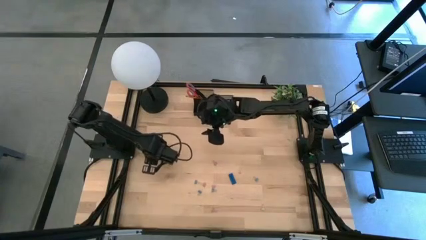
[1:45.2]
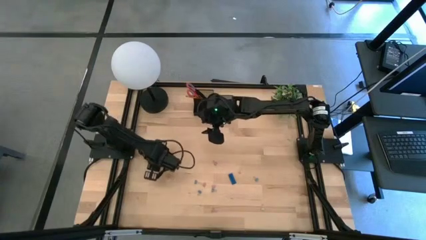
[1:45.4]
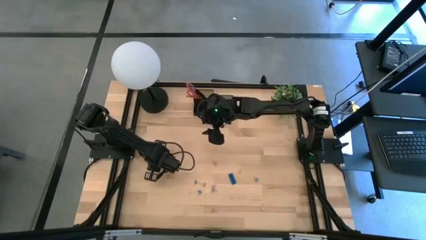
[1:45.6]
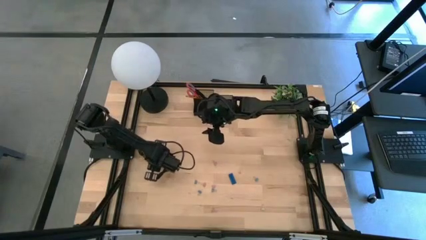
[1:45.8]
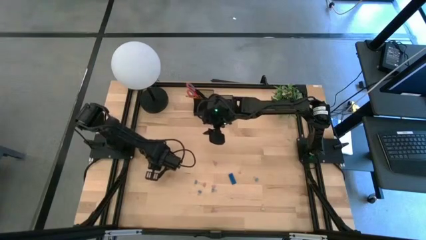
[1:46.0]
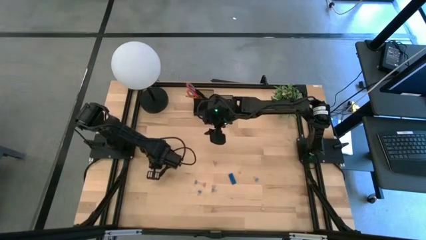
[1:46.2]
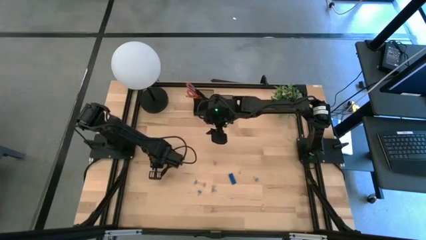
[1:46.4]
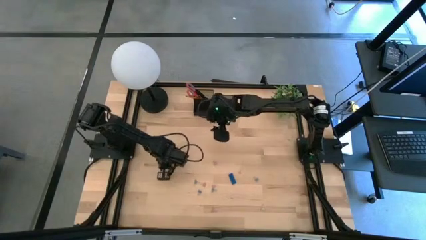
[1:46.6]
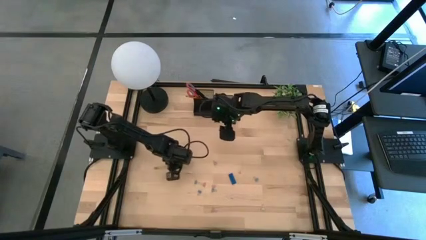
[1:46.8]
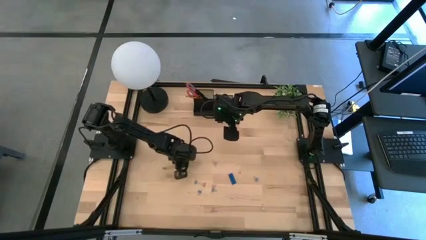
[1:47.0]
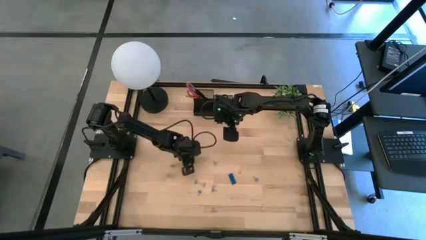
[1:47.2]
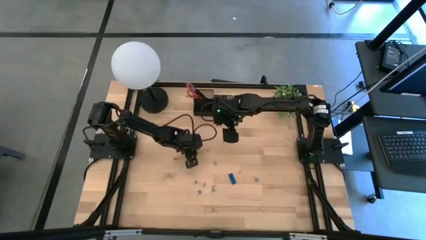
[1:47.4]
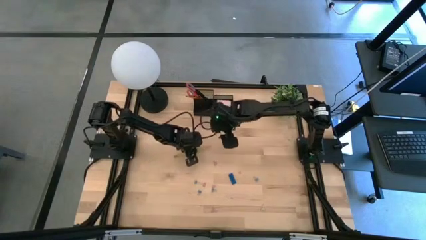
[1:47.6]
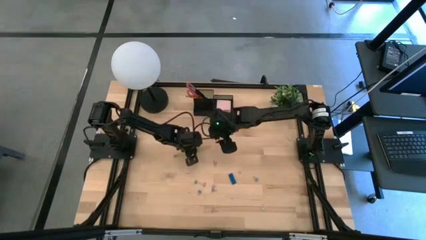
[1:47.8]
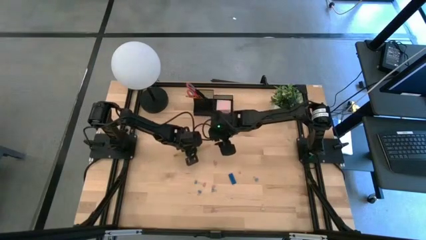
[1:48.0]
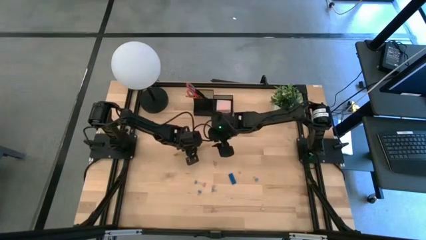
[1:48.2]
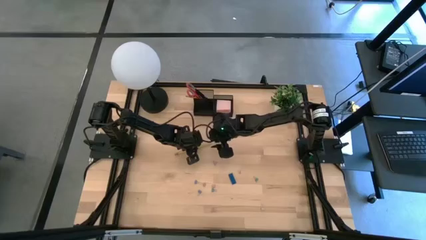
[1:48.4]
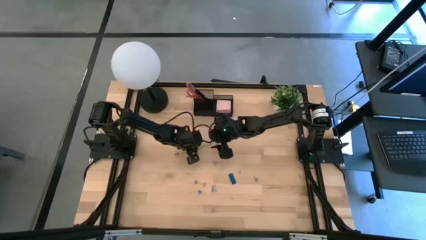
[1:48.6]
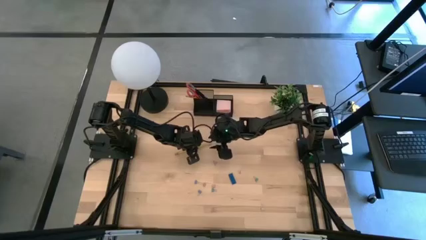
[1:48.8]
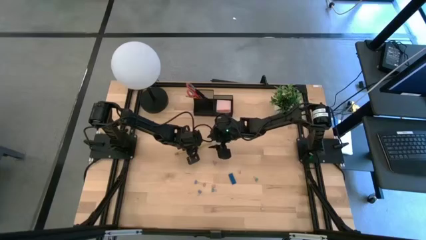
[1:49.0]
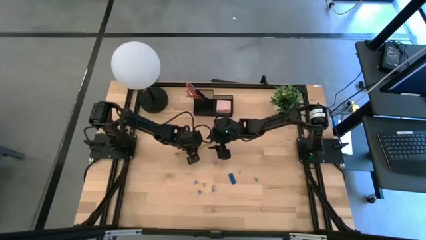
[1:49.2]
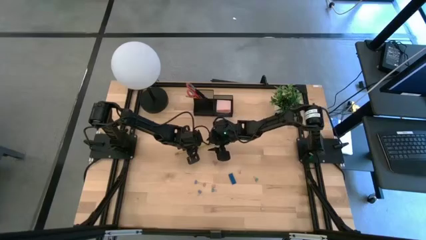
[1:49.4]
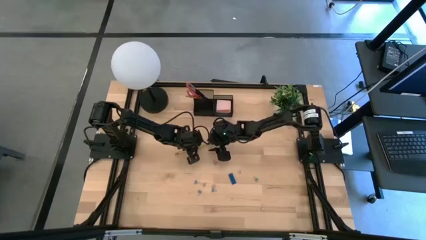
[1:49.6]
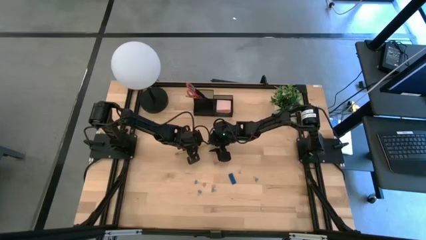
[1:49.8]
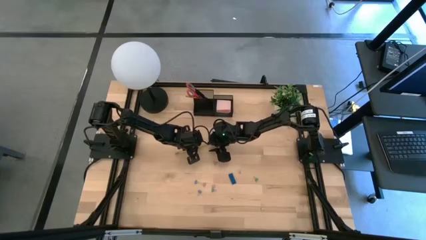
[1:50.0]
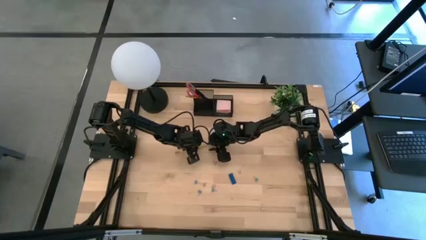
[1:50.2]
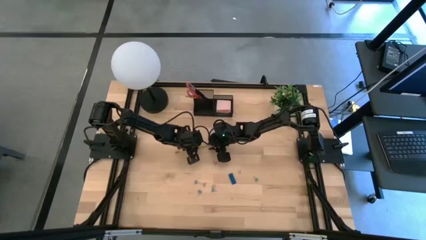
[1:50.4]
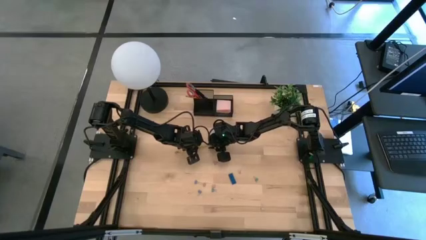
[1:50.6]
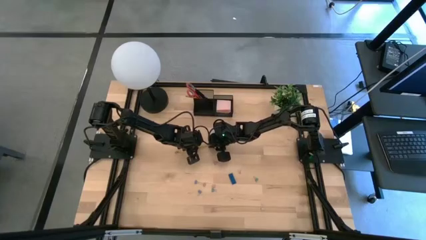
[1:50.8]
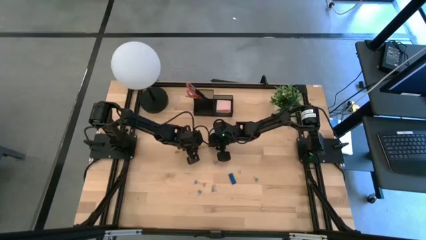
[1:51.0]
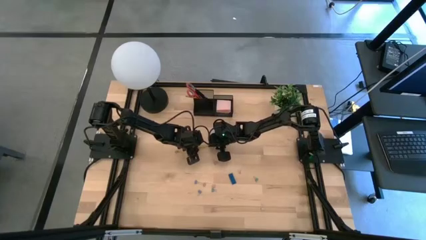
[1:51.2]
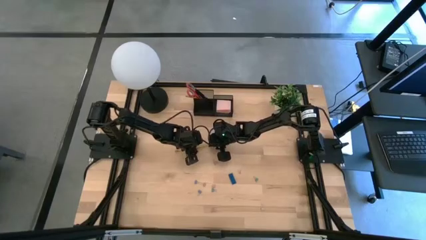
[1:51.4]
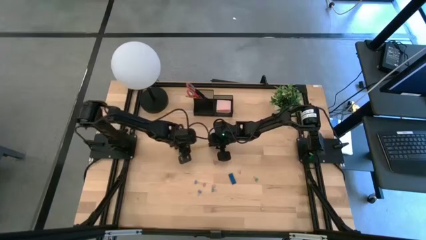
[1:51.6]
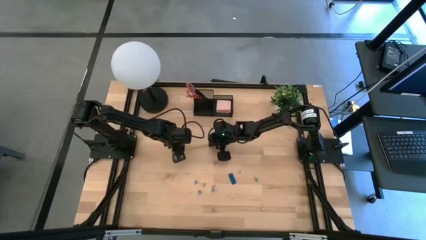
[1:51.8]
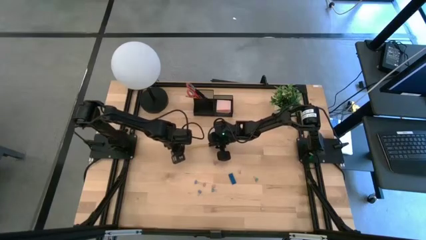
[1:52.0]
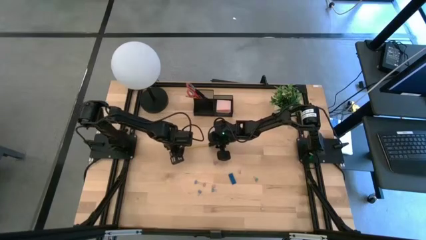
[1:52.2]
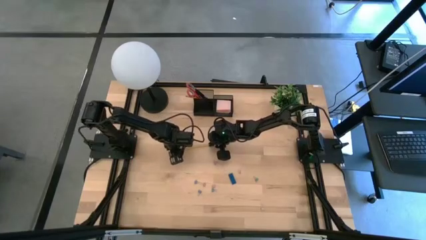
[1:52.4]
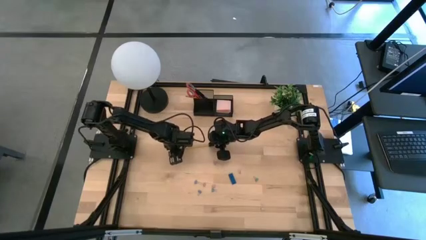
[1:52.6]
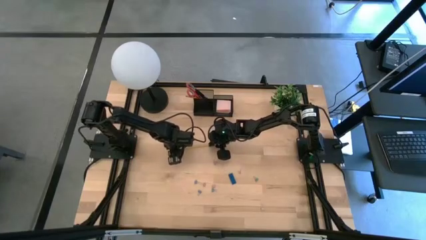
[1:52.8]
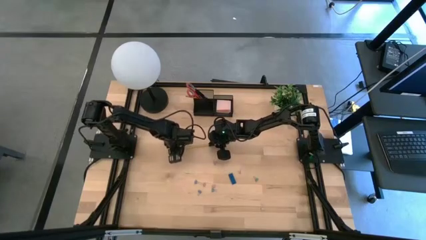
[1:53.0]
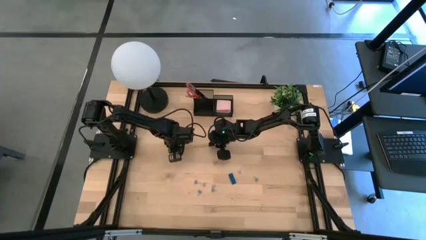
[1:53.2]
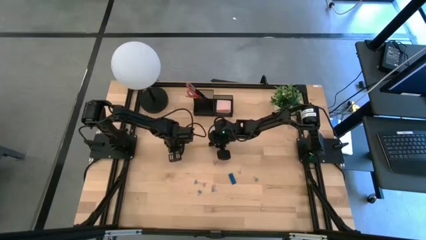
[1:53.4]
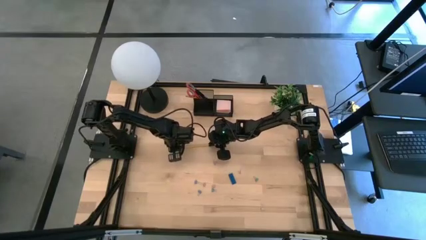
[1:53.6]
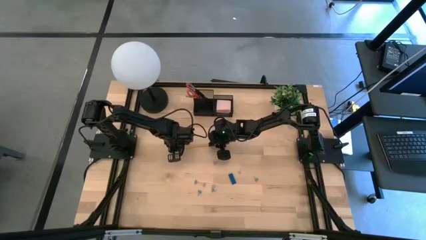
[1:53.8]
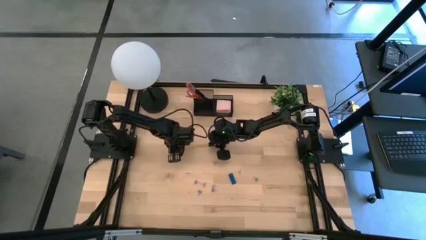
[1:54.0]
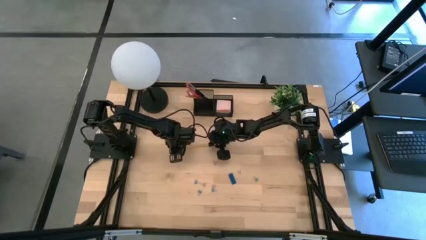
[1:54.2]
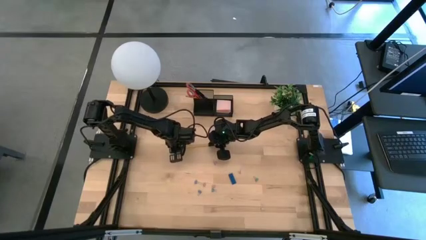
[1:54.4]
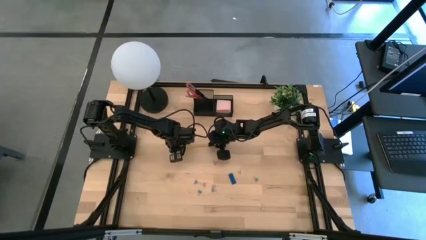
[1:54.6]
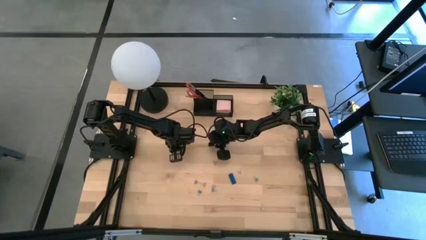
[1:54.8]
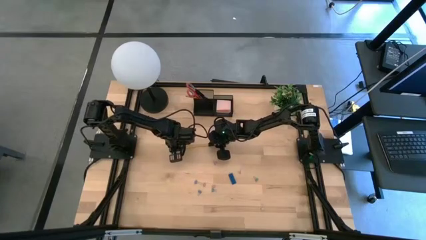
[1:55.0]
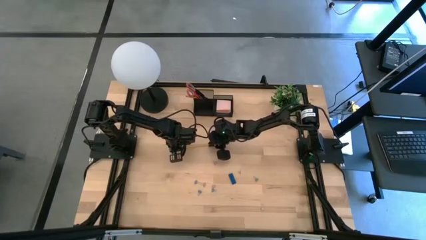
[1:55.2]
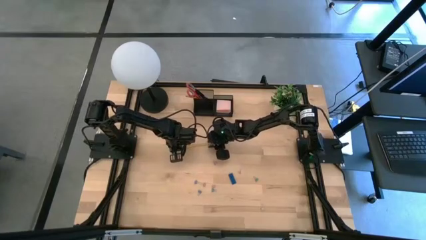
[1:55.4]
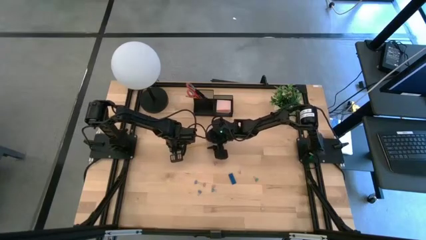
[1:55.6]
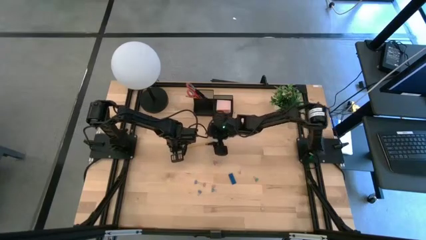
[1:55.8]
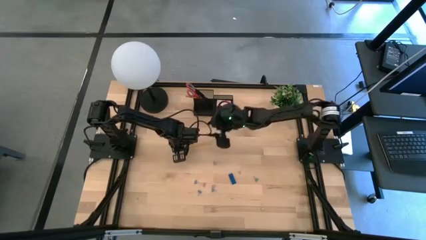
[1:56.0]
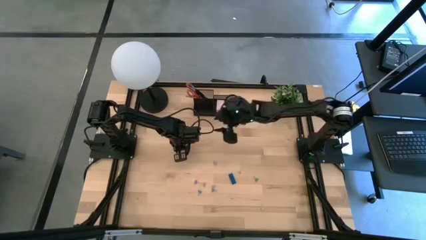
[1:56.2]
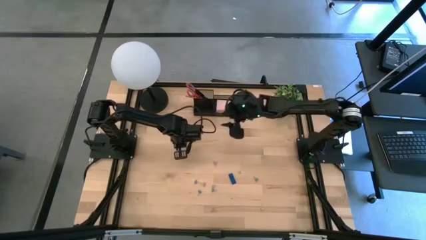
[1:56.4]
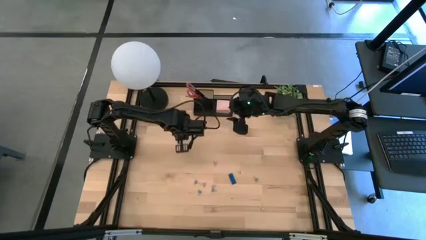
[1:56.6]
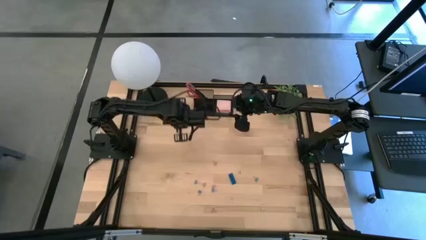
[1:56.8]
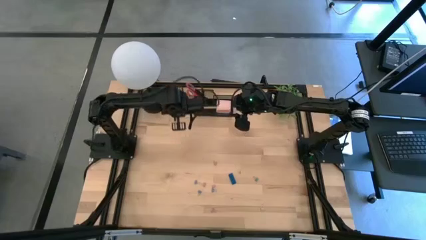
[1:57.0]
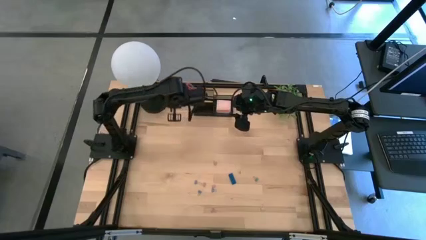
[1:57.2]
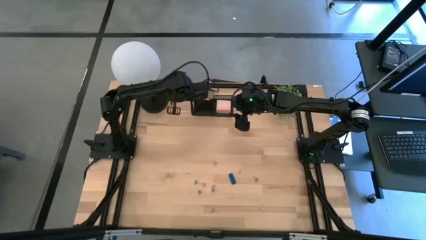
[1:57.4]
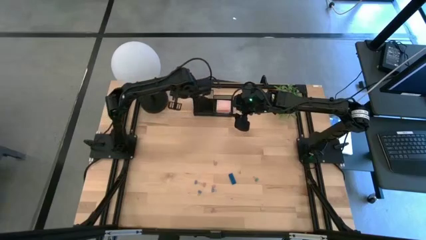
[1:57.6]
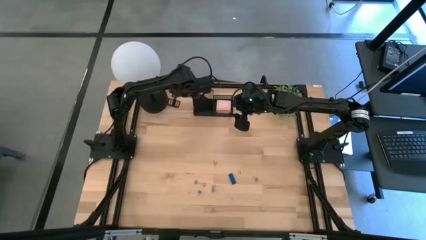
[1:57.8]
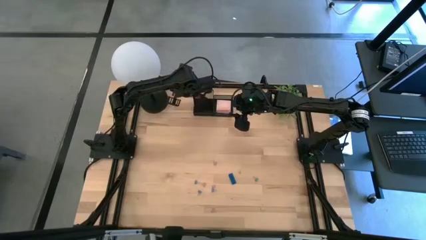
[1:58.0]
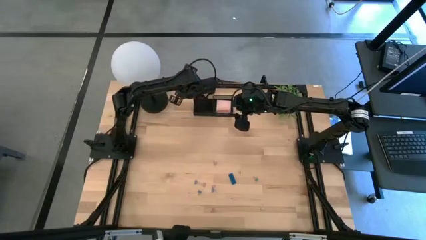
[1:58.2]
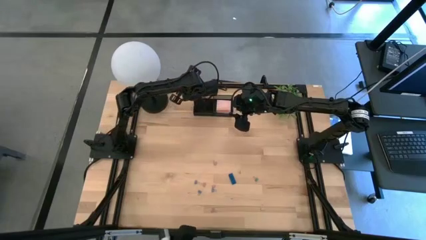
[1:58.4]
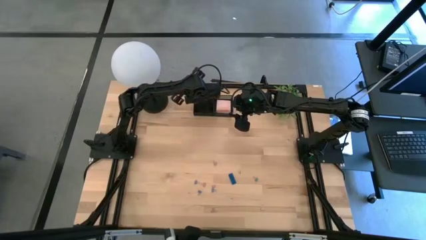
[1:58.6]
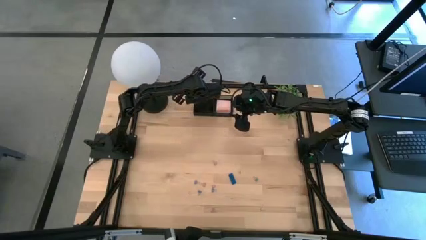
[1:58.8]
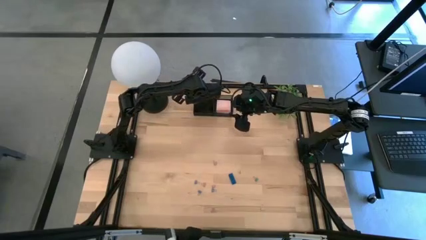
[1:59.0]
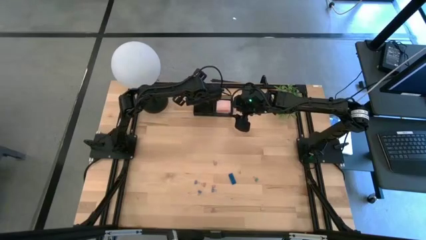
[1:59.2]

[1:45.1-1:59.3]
Task: Pick and place office supplies into organizer
Put the yellow pencil into the black desk organizer
